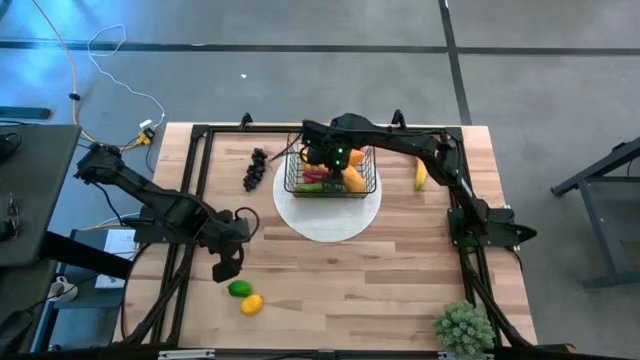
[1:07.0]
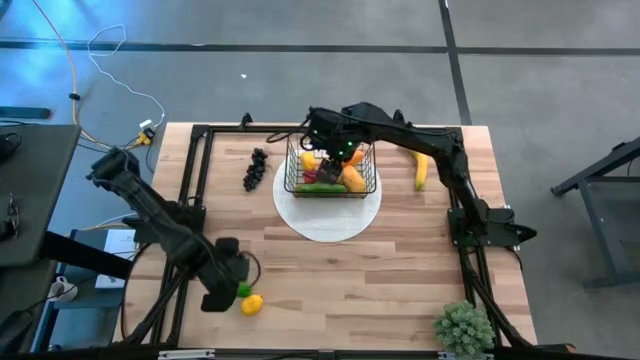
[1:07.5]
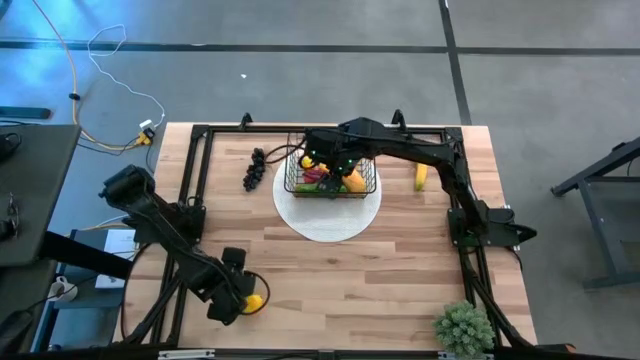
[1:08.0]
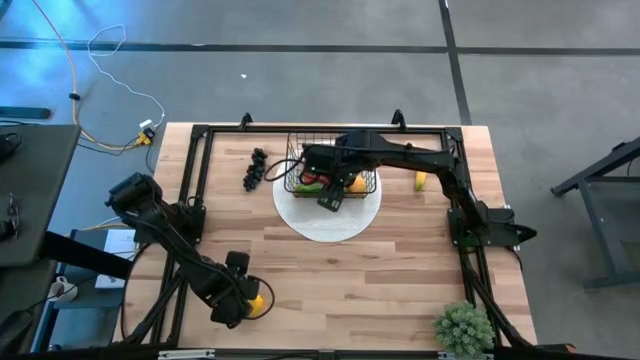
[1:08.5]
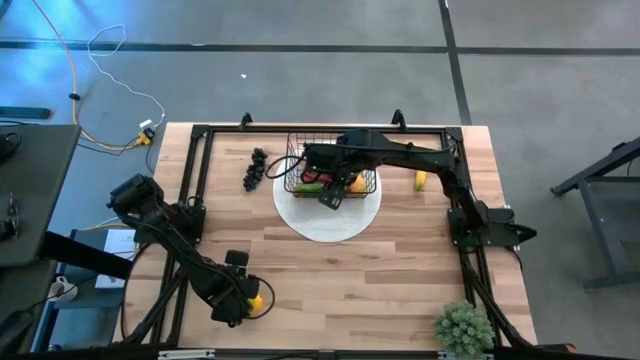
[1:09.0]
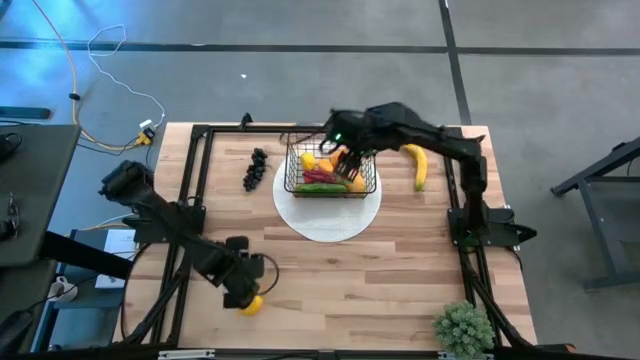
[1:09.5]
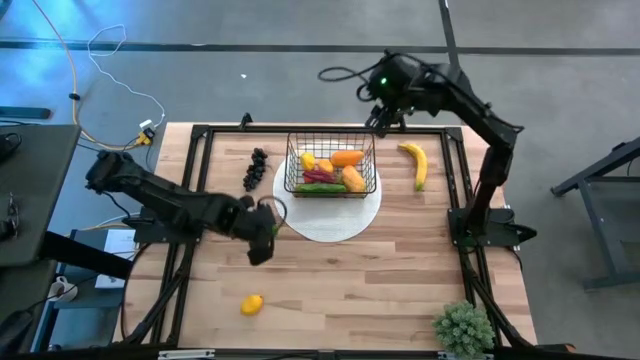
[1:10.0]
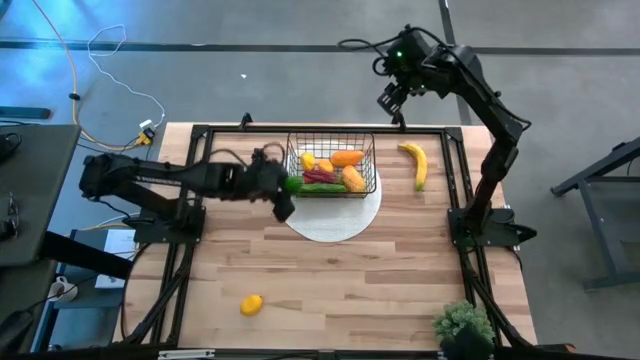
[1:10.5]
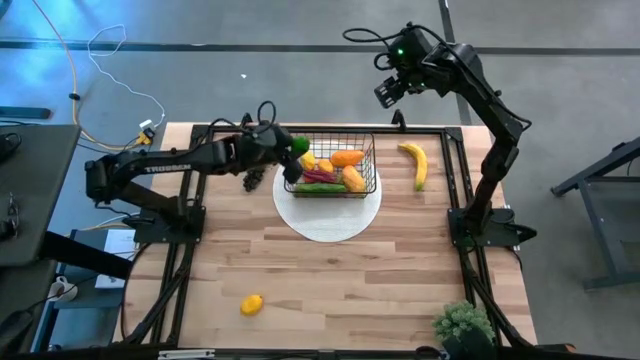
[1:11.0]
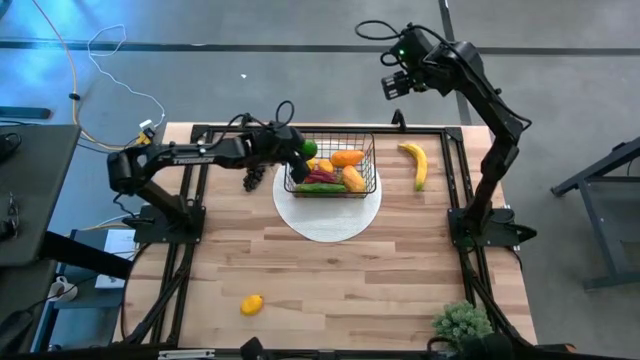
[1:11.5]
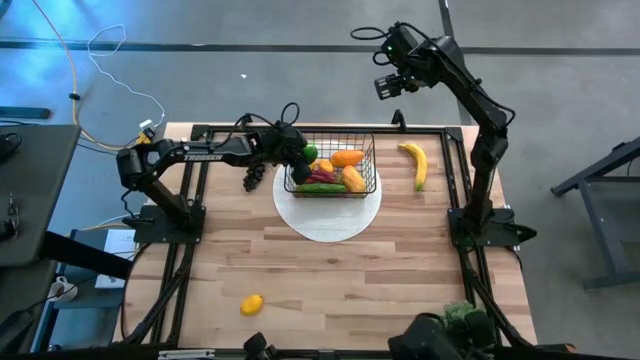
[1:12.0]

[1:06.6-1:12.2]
Task: Build produce basket
Put the lime into the wire basket

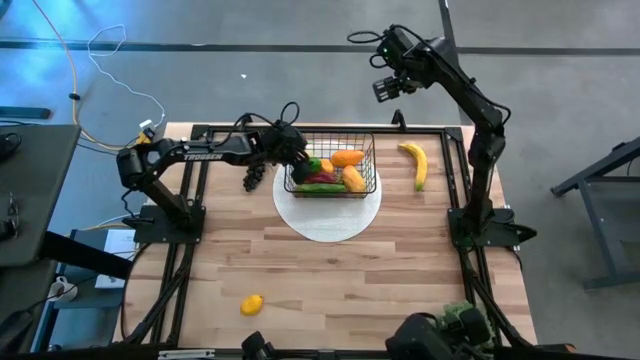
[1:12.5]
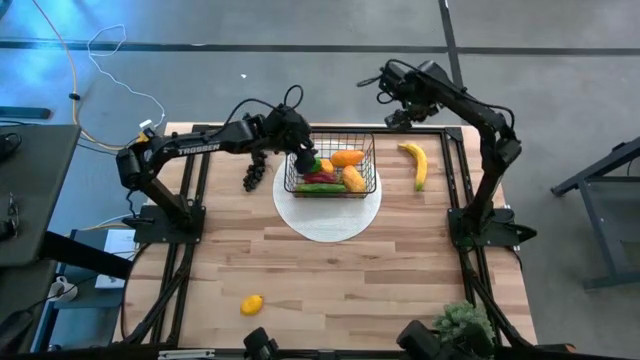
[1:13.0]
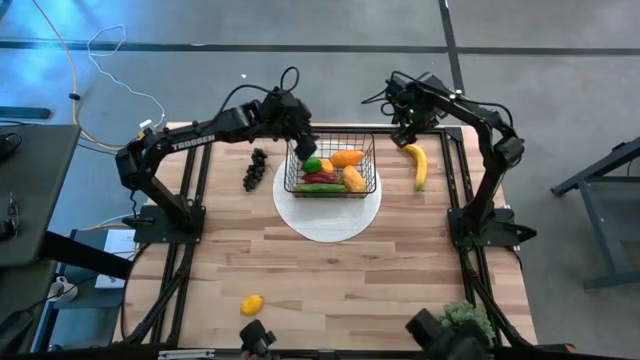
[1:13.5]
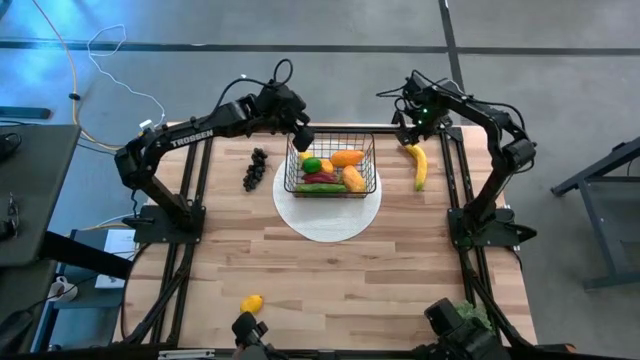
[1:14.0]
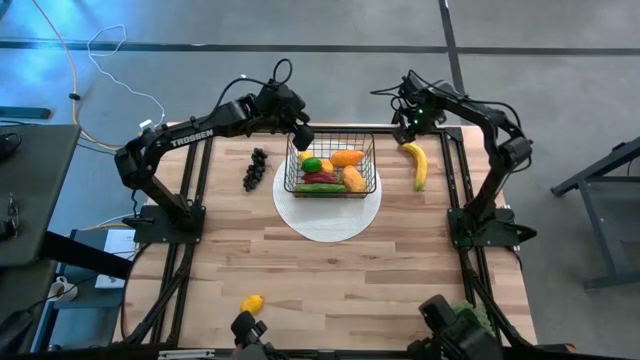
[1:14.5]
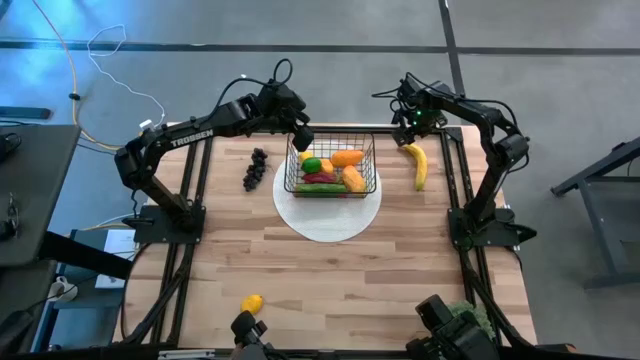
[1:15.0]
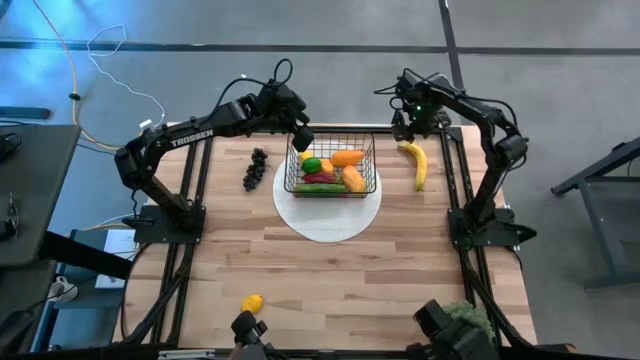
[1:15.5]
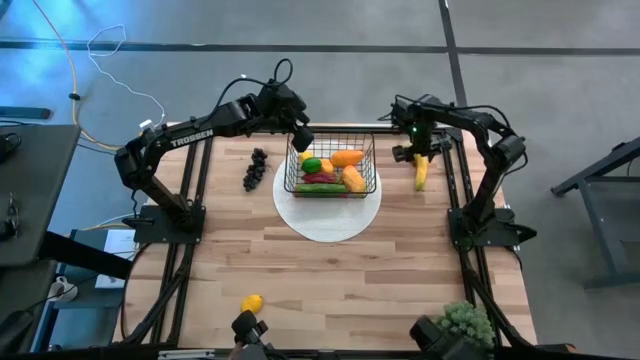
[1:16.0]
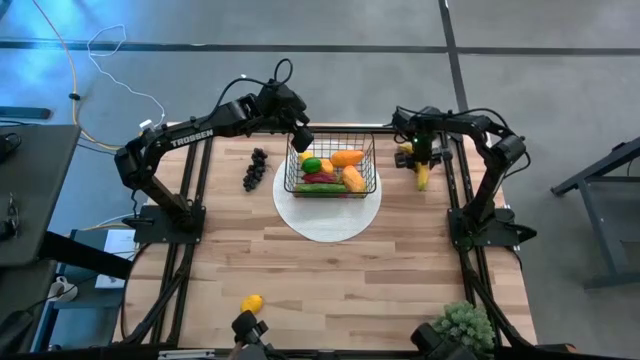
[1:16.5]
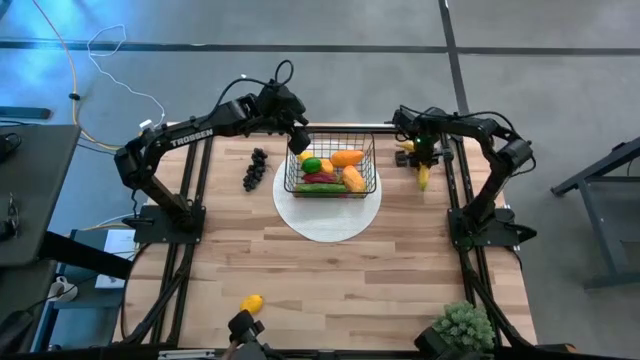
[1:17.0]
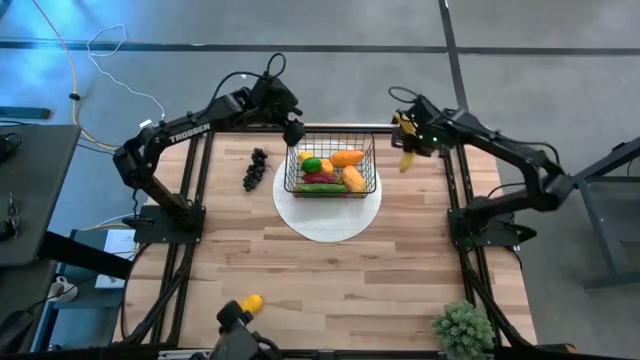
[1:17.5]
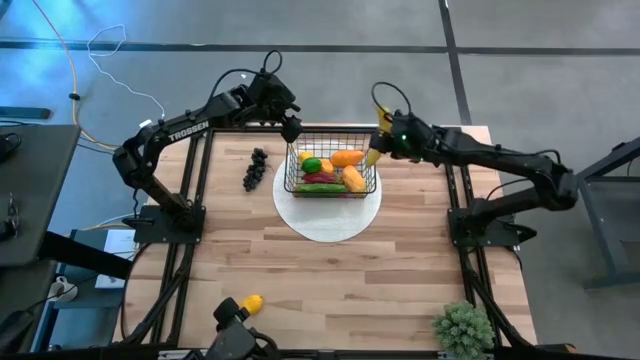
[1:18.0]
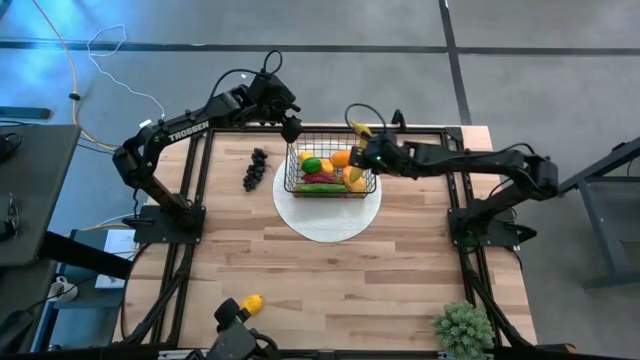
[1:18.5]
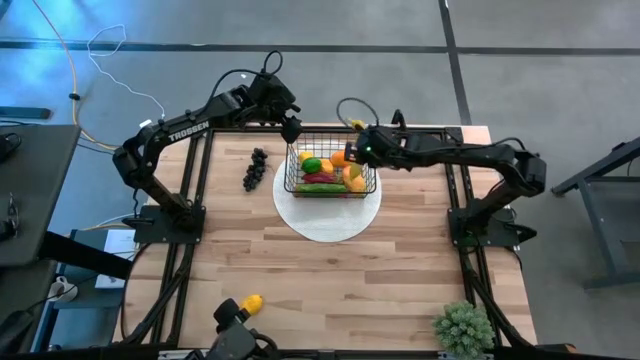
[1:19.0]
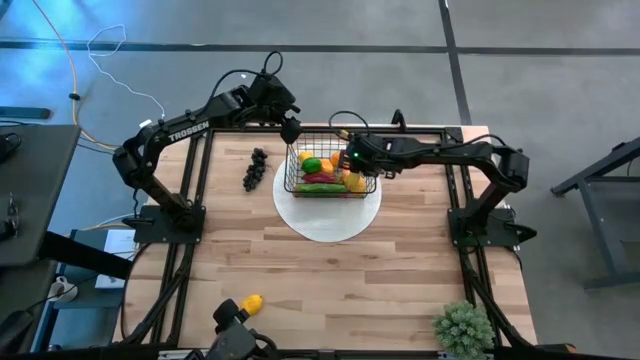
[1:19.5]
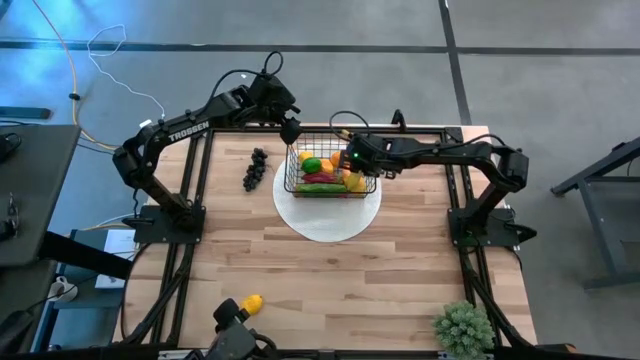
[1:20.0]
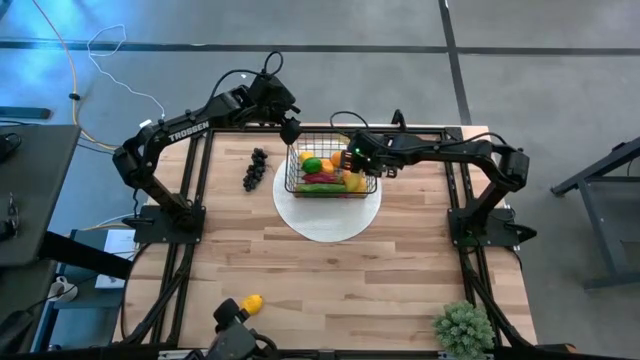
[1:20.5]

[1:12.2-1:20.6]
Put the banana into the wire basket

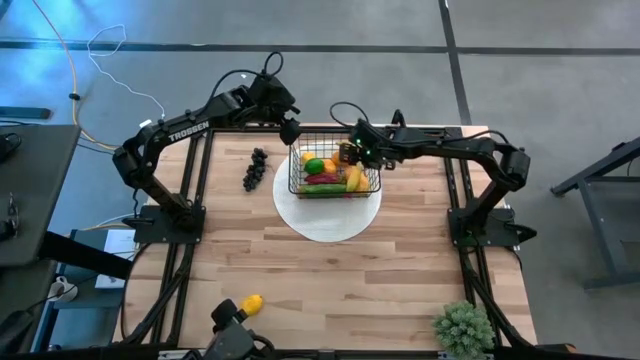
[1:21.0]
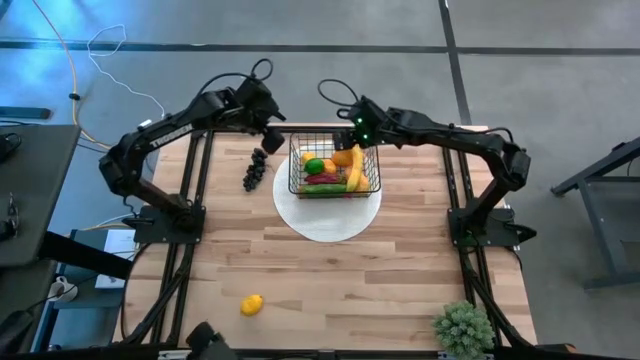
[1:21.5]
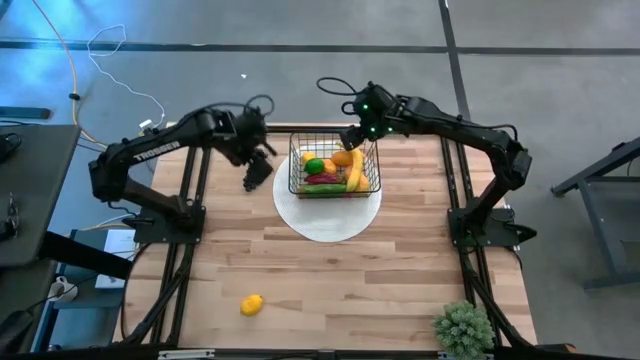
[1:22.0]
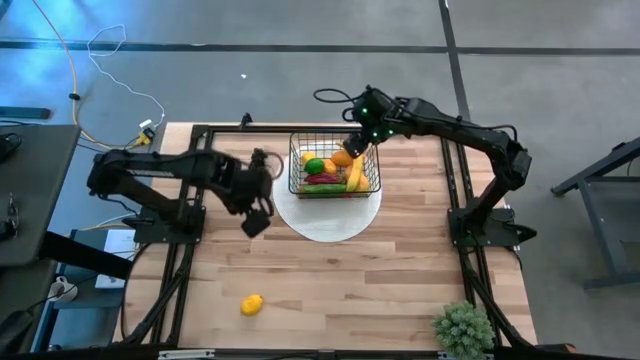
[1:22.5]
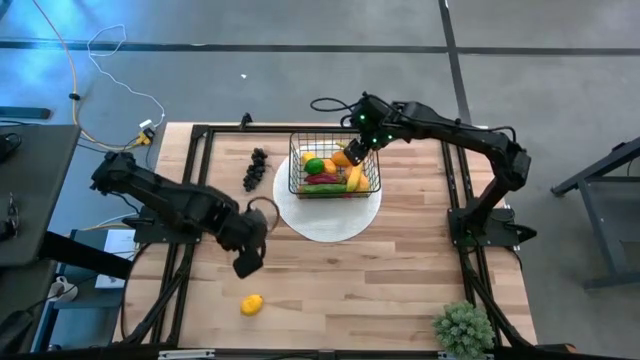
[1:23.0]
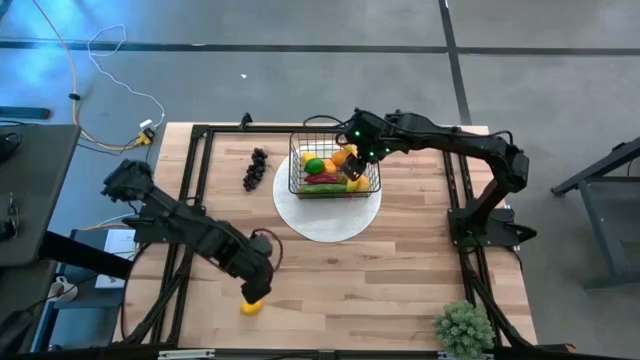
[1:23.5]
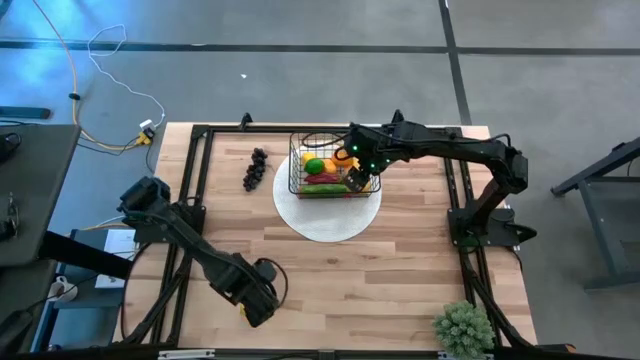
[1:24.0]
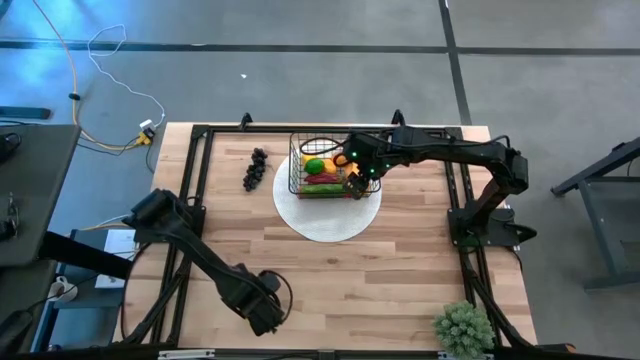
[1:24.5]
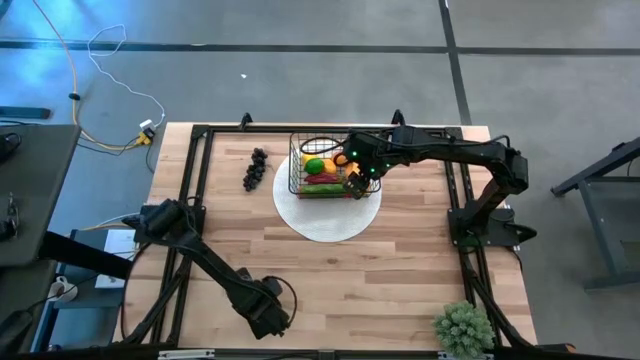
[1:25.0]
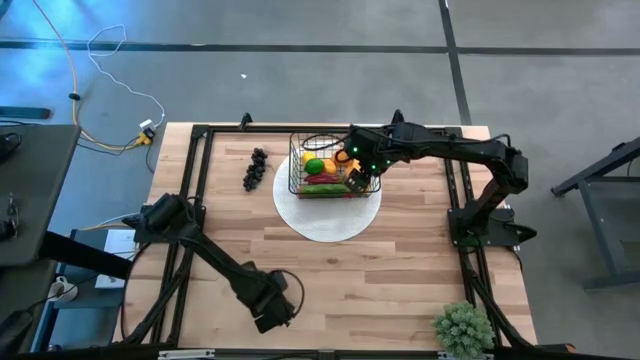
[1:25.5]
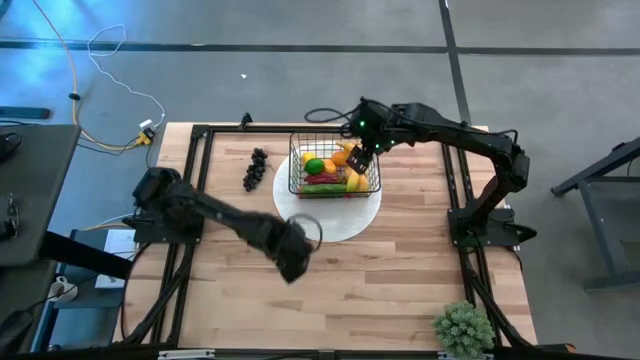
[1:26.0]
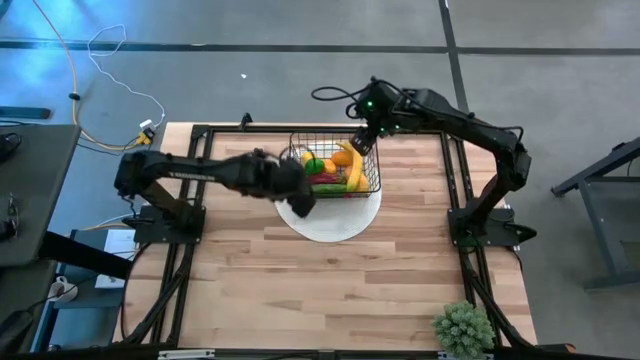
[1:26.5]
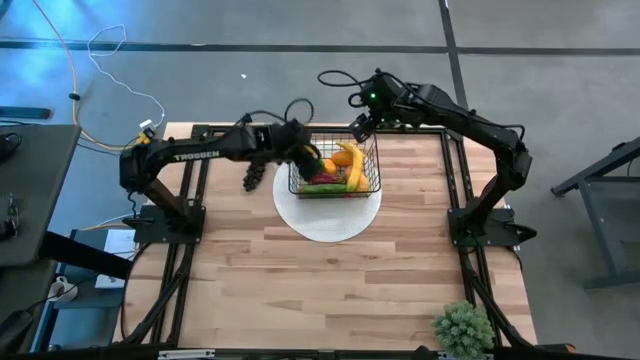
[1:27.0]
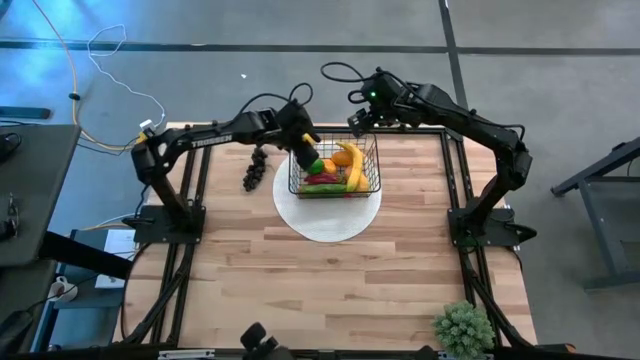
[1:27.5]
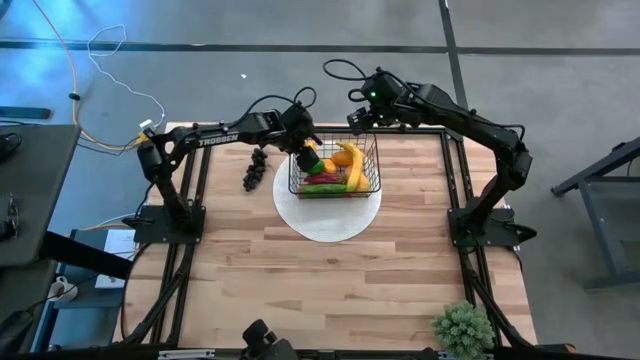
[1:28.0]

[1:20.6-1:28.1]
Put the lemon into the wire basket
